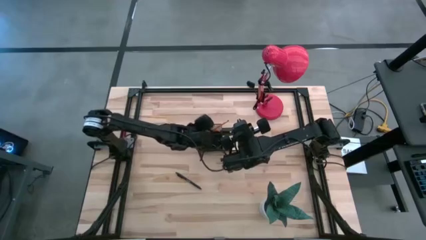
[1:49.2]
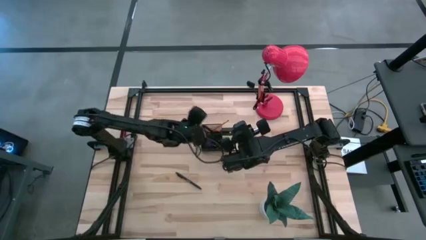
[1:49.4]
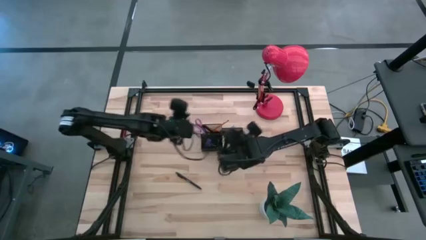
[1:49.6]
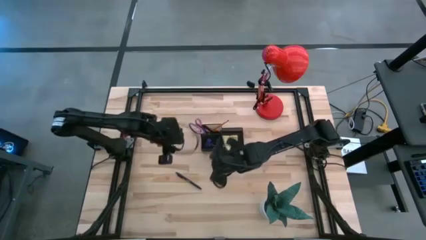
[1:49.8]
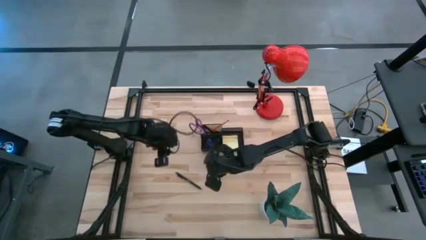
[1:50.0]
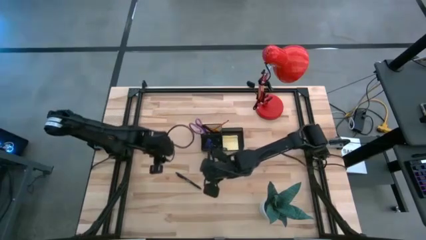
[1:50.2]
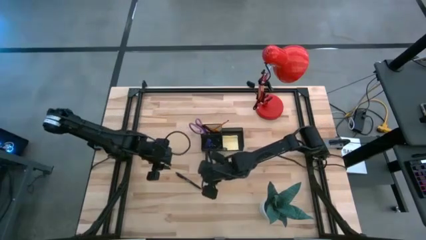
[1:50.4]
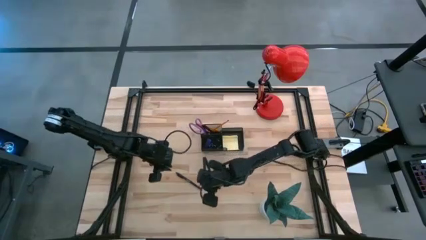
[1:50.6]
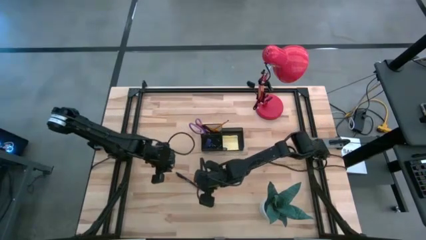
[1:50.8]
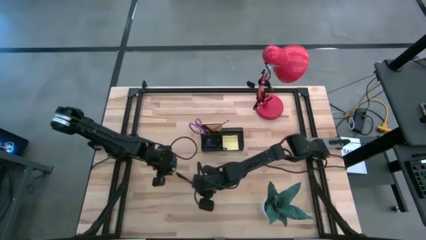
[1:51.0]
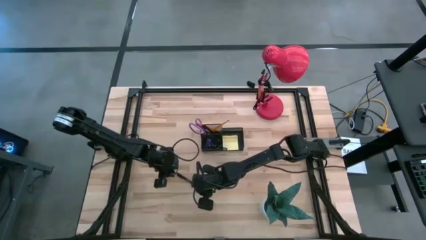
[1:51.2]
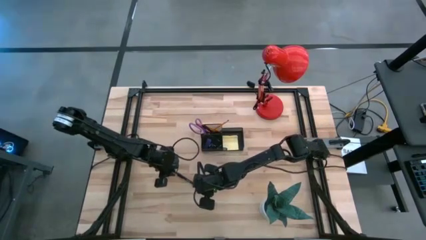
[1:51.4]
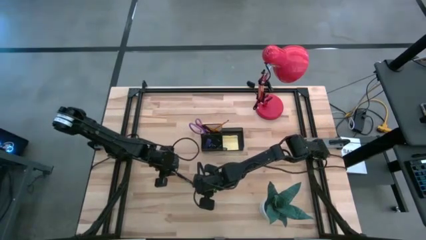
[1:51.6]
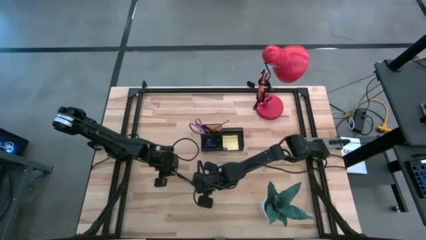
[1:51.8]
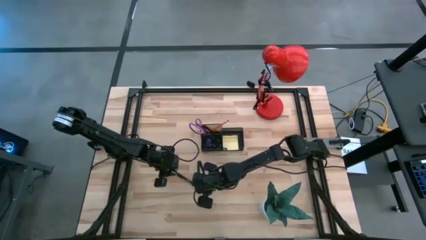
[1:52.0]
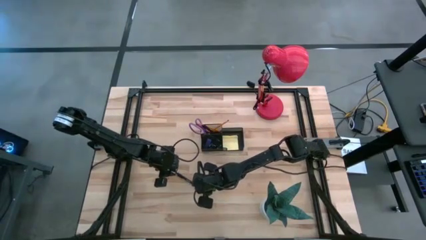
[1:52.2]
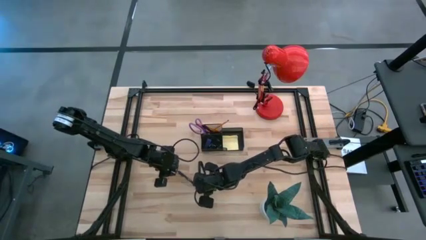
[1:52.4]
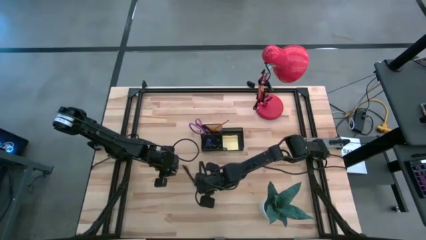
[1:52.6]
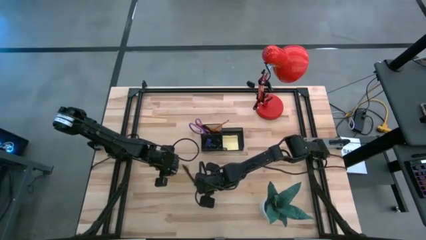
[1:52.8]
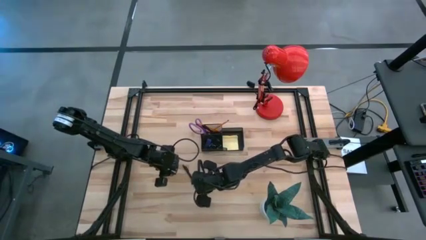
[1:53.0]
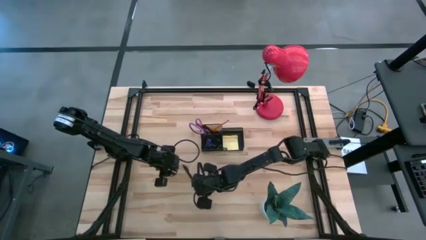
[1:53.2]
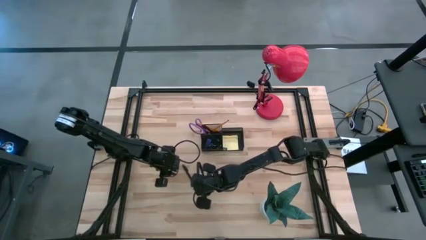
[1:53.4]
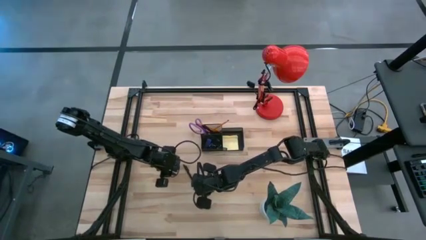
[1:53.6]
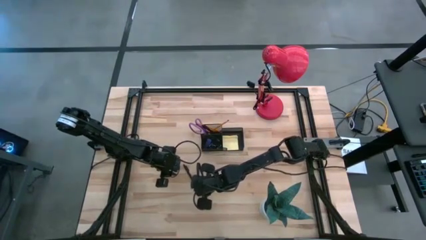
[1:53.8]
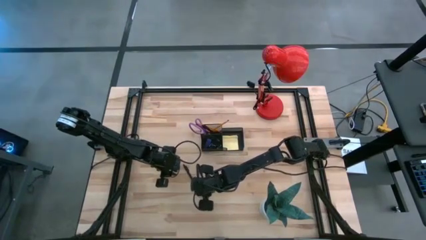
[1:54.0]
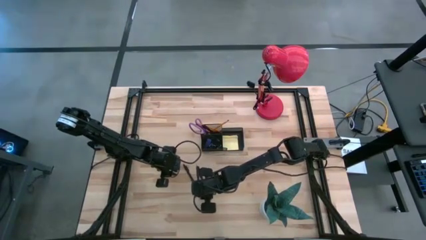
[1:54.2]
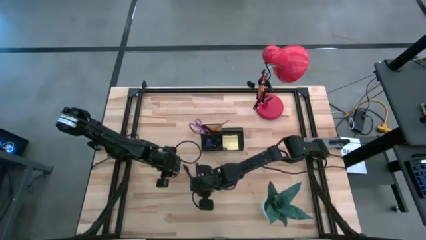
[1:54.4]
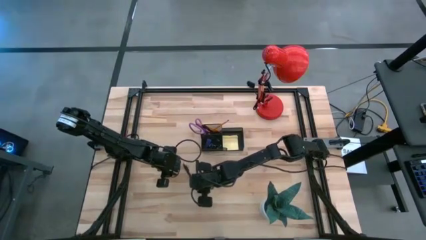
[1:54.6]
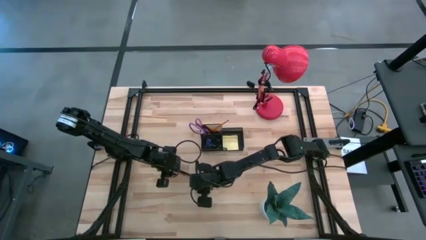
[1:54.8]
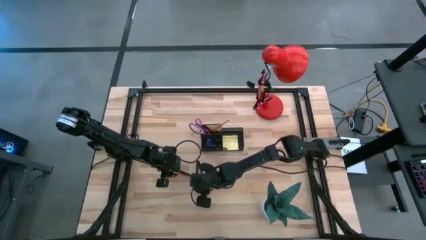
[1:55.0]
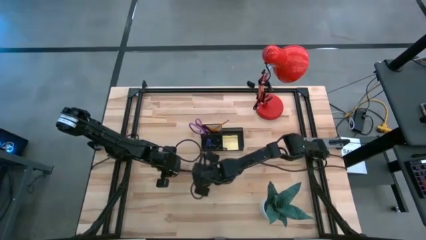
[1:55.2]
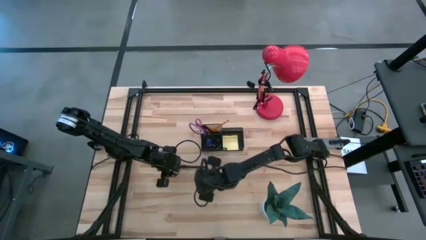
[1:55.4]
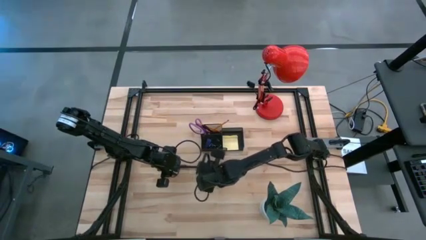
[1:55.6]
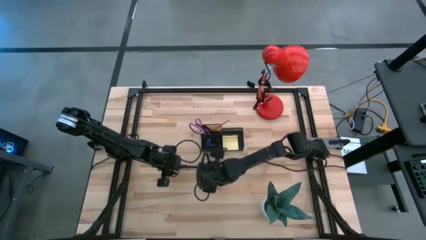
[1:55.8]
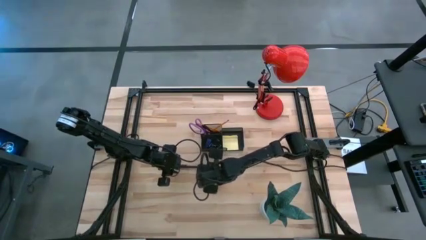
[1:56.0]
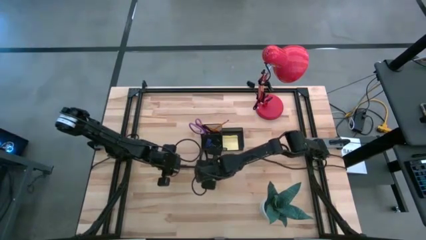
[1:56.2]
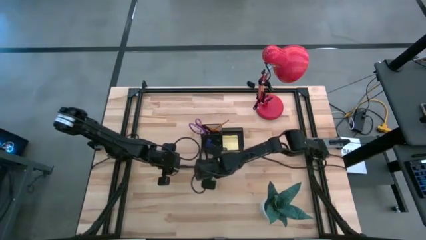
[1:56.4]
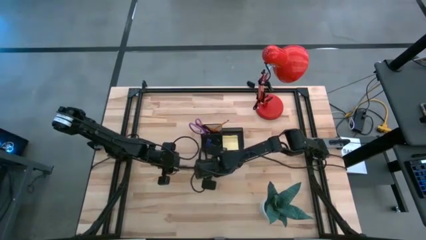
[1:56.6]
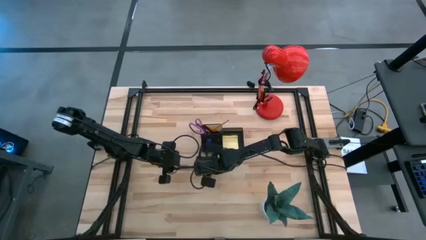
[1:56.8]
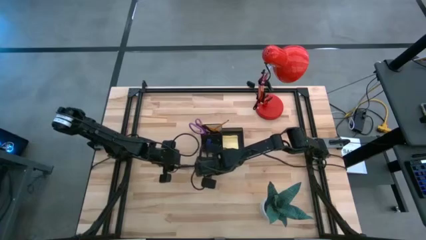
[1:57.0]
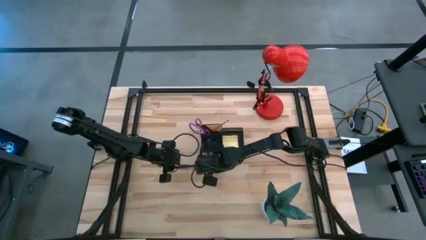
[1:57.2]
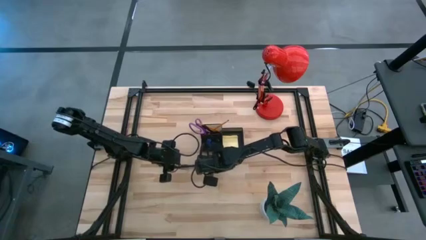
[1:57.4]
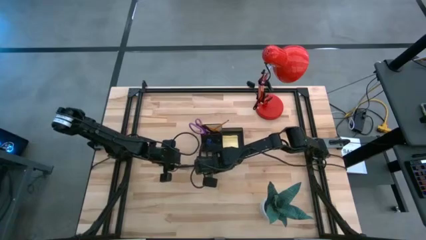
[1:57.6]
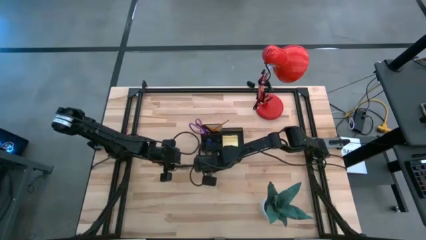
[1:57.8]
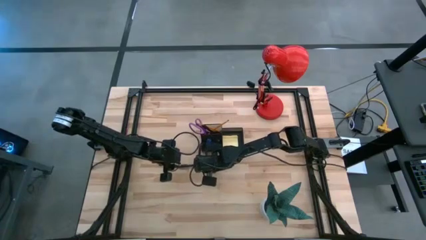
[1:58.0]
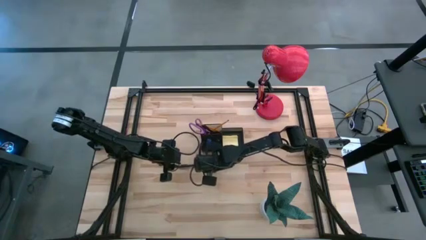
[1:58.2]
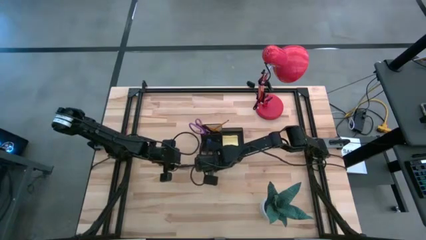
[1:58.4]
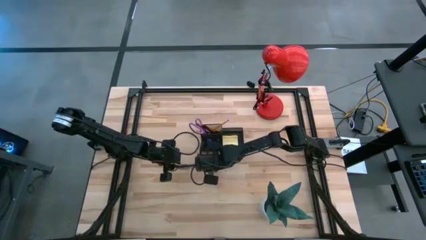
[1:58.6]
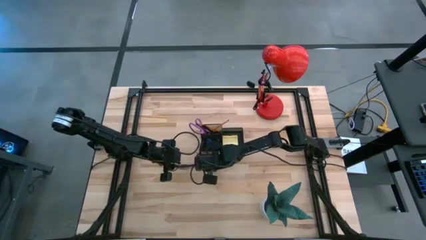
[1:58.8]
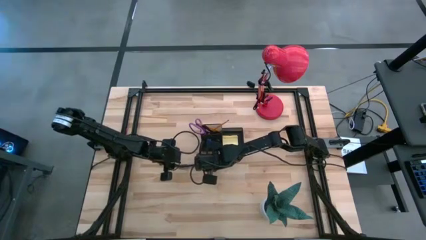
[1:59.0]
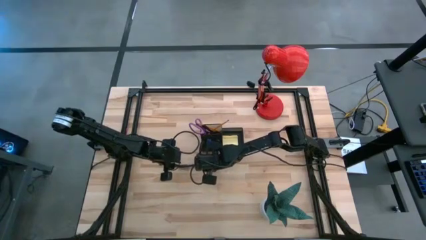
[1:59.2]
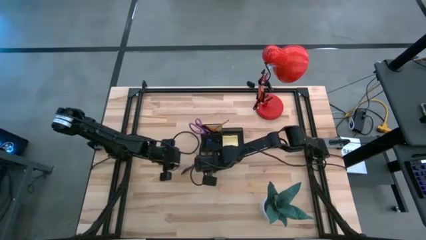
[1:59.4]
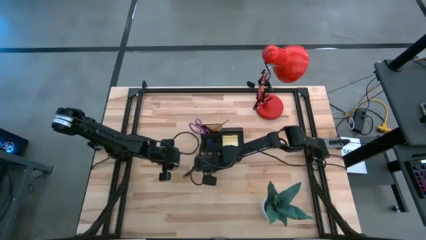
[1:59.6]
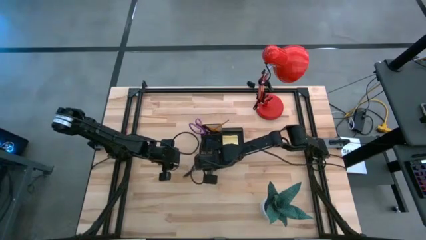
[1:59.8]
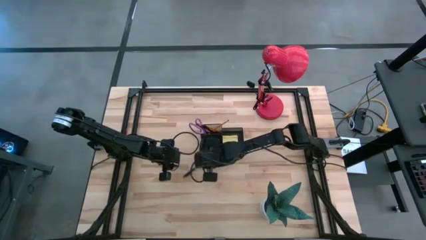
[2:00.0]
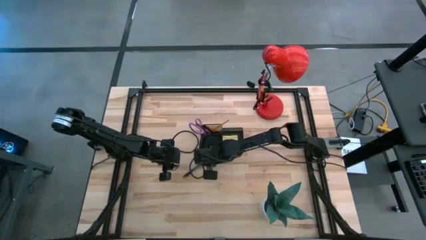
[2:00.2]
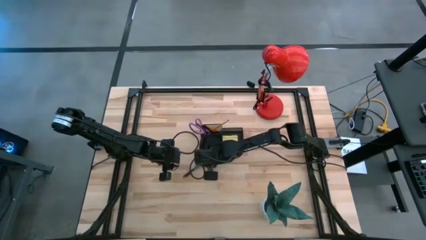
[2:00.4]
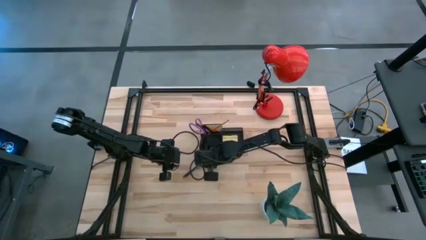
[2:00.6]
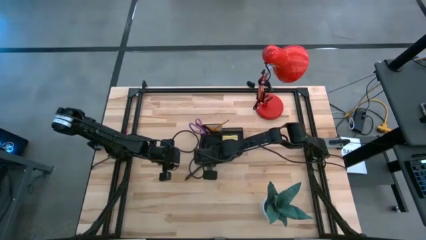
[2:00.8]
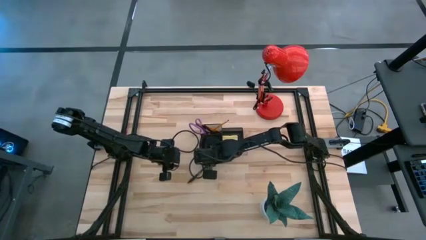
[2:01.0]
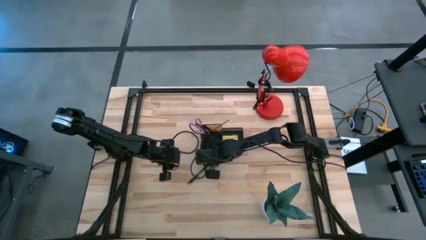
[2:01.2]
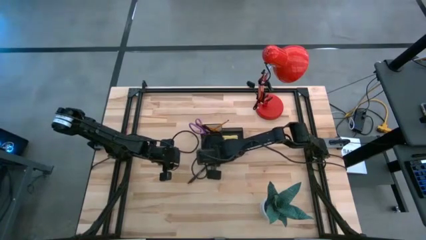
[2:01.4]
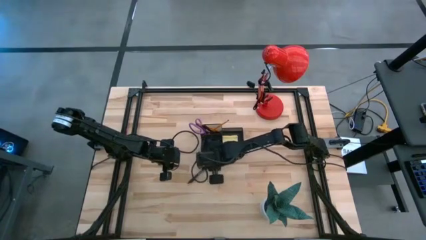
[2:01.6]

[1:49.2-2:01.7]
Task: Pick and place office supplies into organizer
Put the black pen into the black desk organizer

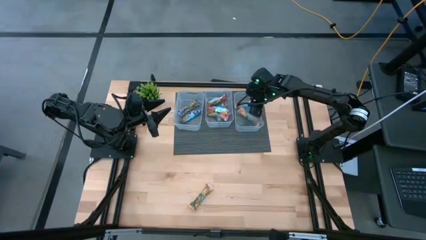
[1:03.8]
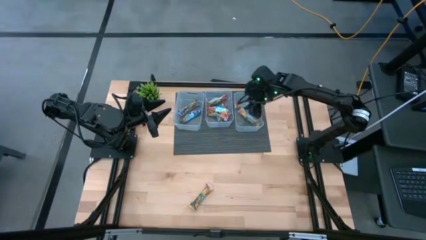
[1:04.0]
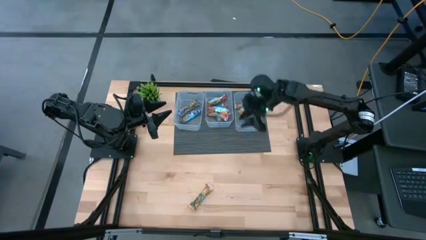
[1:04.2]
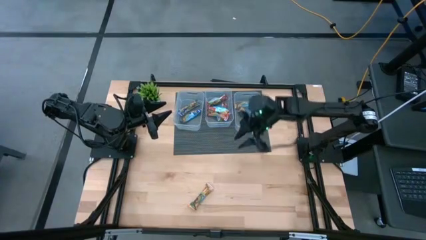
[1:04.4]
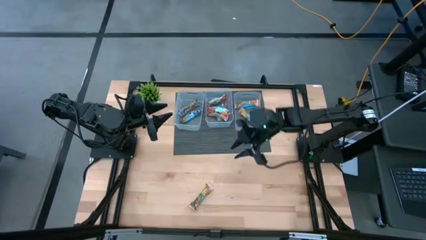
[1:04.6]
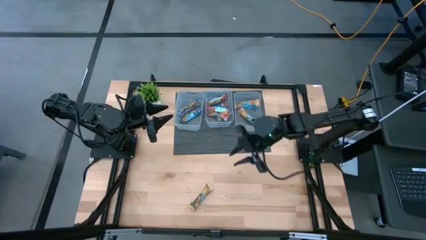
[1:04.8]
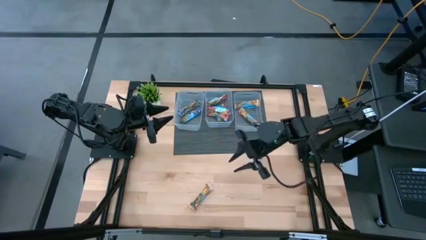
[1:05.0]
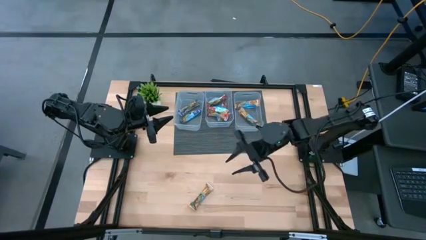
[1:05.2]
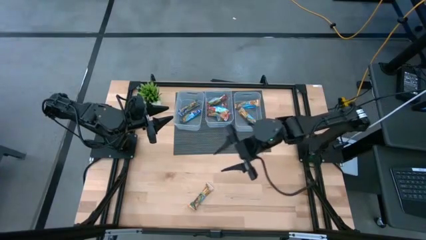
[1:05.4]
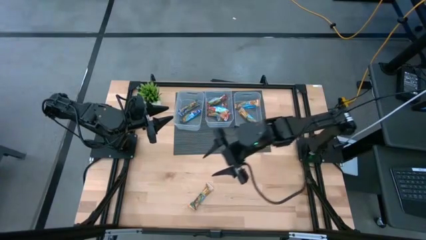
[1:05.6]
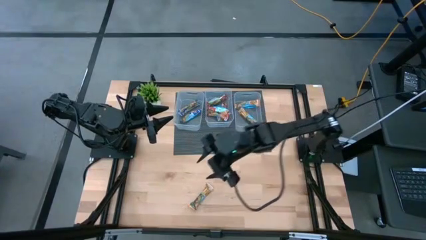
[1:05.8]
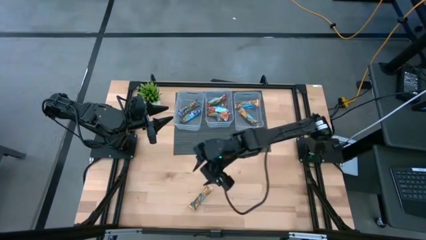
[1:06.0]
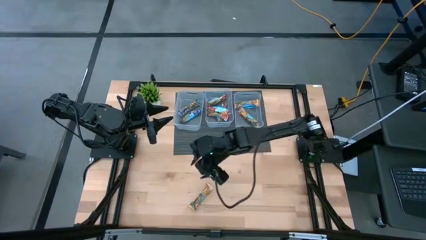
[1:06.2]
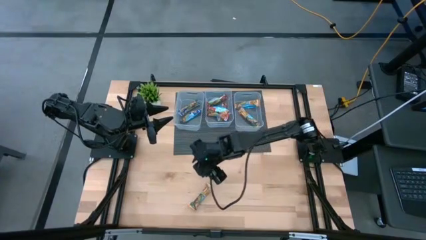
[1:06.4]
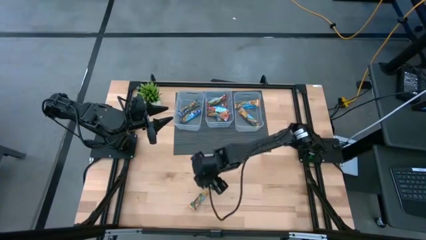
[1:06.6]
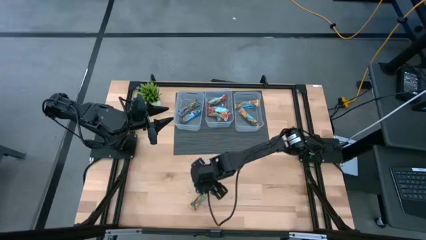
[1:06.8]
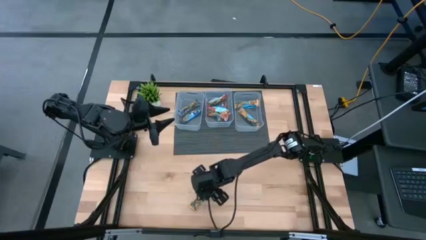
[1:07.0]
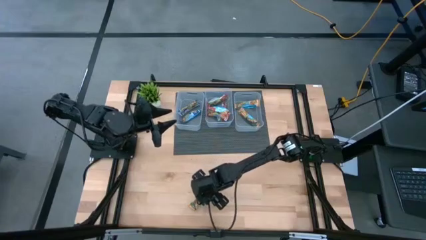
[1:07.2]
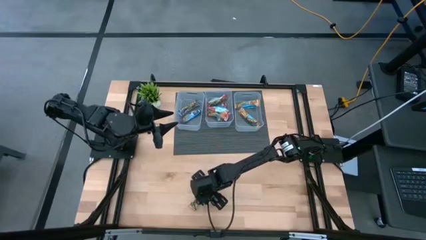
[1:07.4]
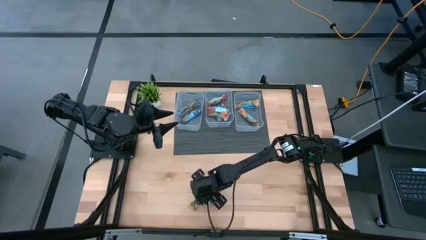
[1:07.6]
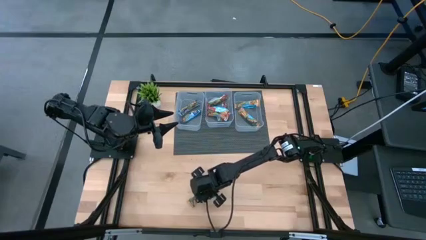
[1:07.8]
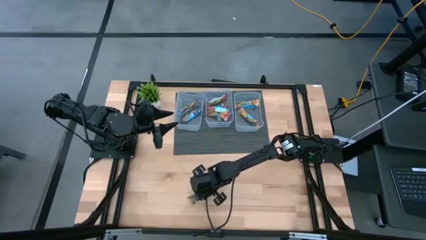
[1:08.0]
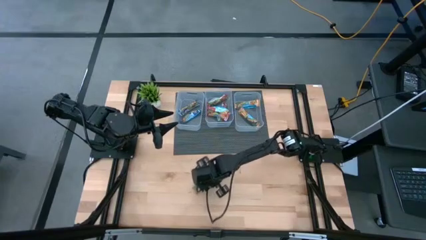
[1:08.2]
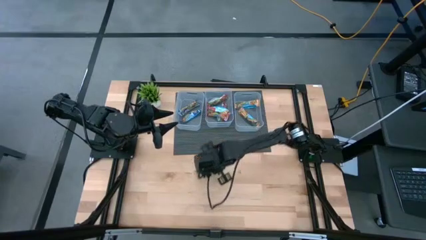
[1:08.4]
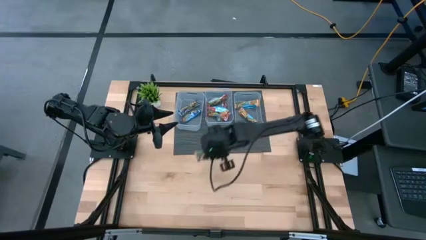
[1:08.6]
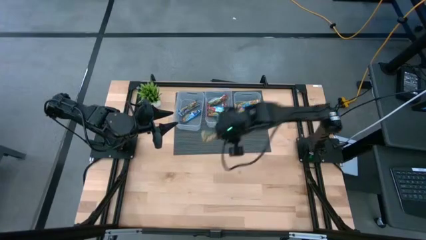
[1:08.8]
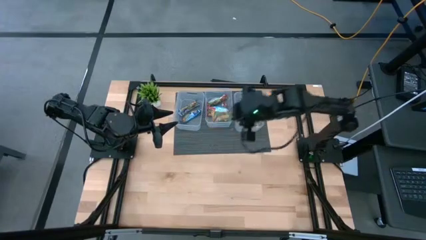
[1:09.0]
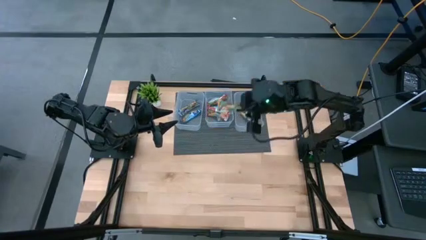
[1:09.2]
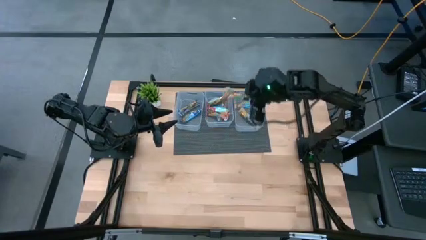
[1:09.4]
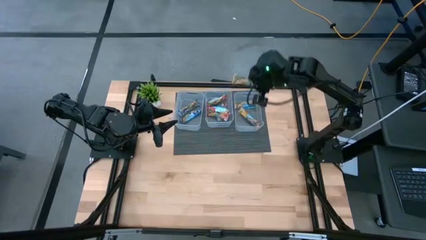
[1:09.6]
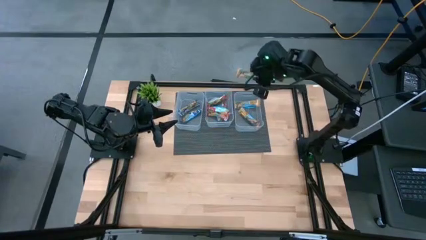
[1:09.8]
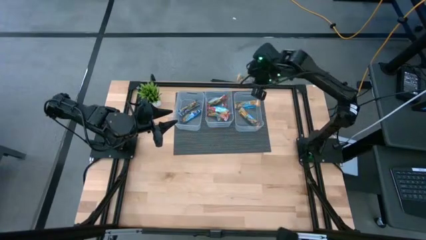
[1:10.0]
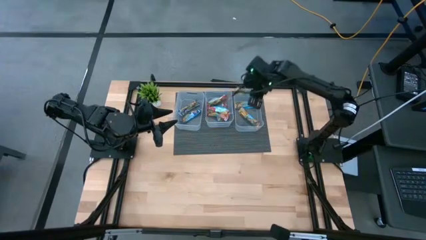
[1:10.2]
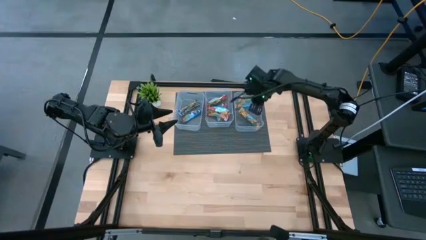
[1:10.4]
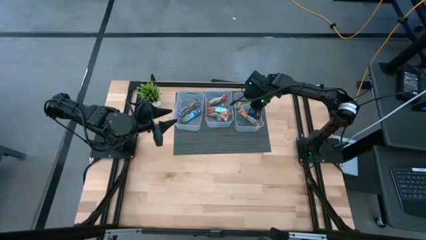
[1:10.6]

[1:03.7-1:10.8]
Task: Pick and place Granola Bars by type
Put the yellow granola bar into the right transparent bin
